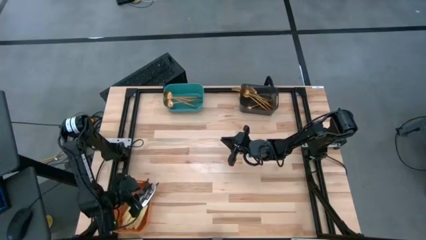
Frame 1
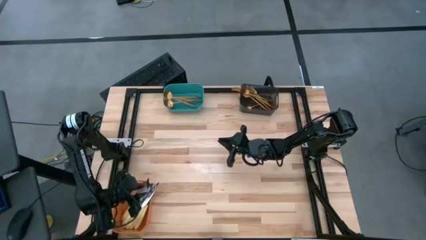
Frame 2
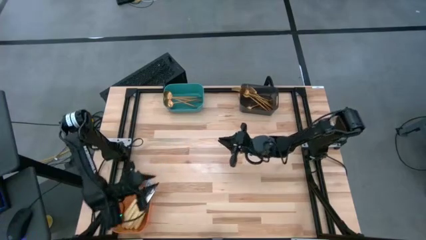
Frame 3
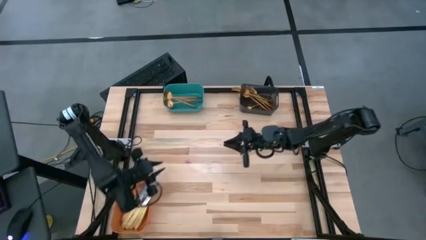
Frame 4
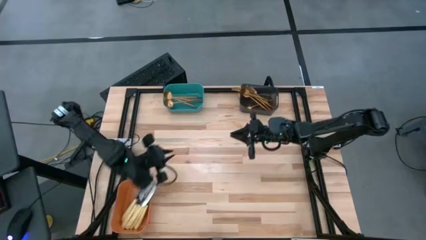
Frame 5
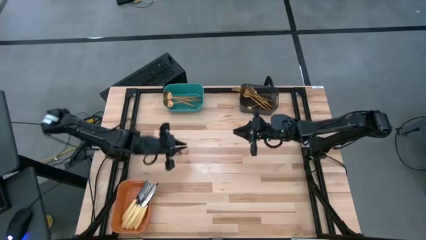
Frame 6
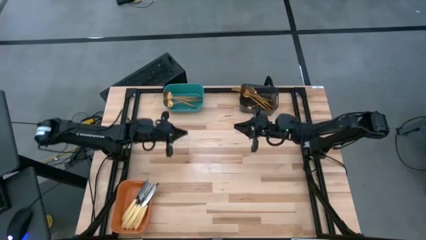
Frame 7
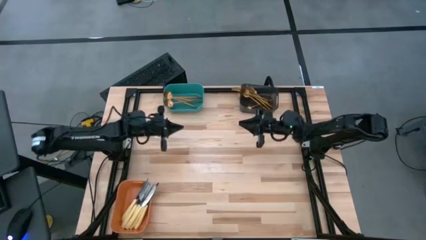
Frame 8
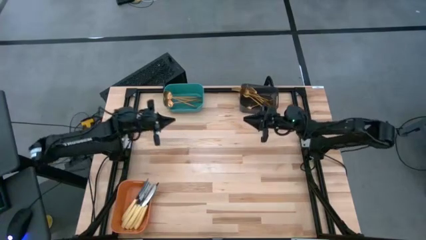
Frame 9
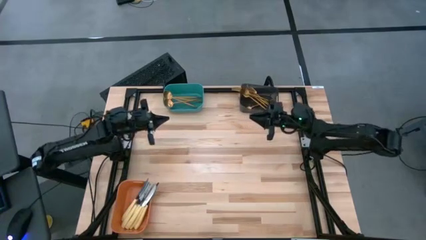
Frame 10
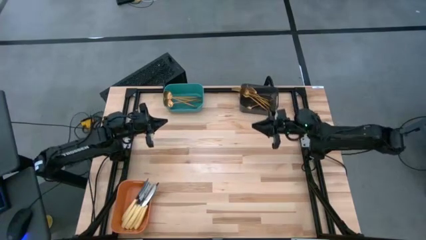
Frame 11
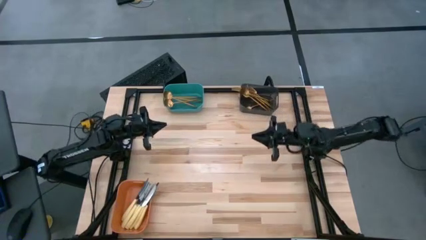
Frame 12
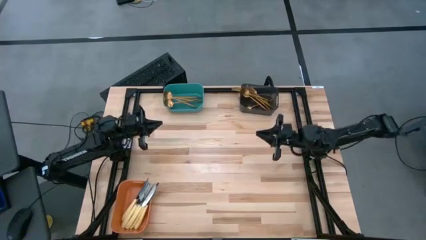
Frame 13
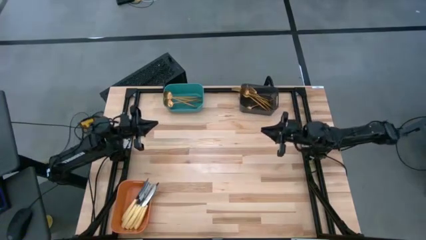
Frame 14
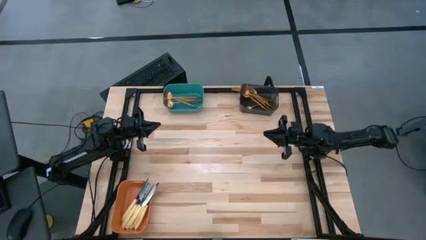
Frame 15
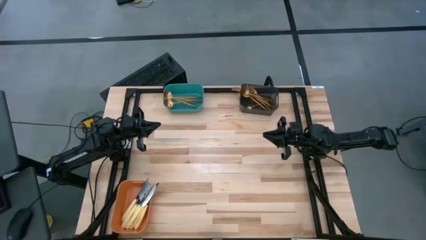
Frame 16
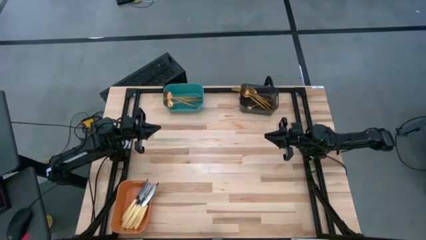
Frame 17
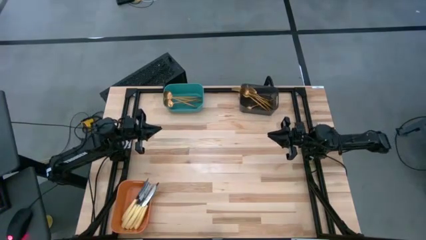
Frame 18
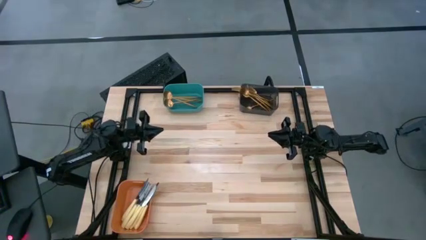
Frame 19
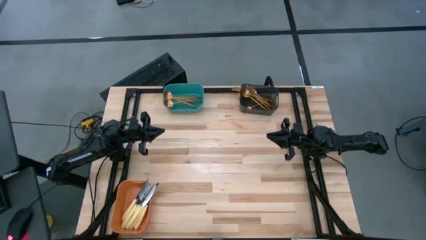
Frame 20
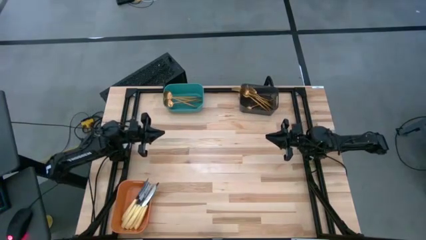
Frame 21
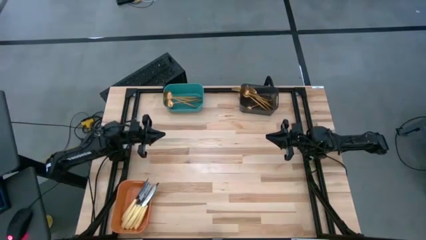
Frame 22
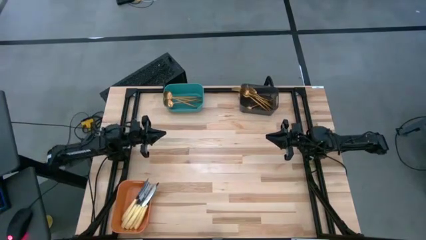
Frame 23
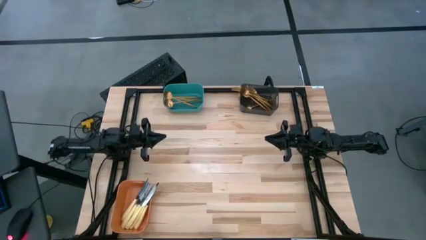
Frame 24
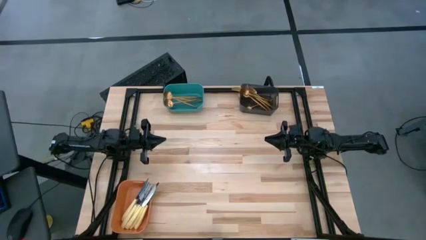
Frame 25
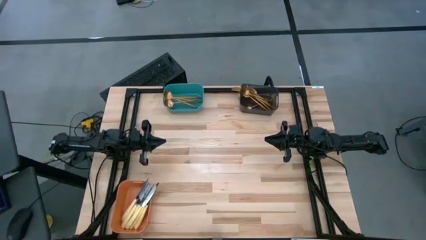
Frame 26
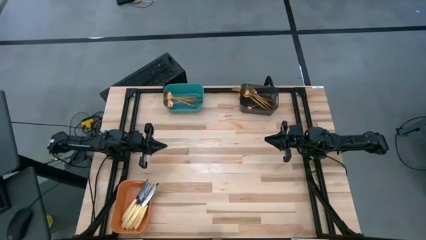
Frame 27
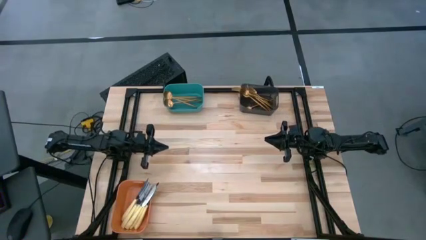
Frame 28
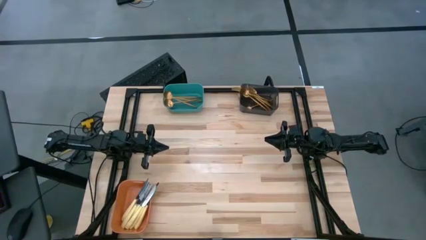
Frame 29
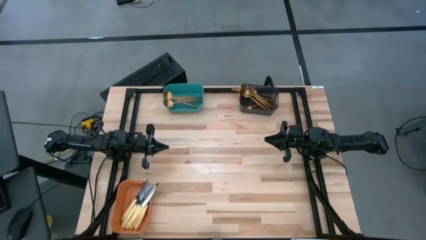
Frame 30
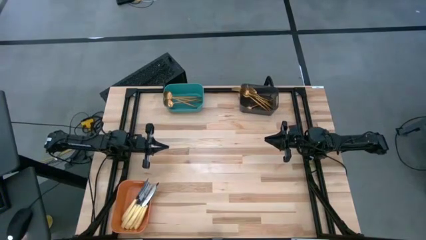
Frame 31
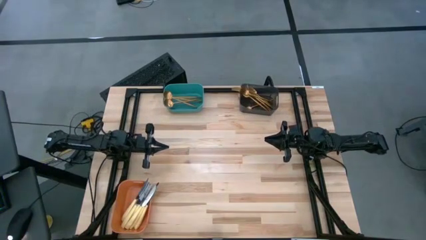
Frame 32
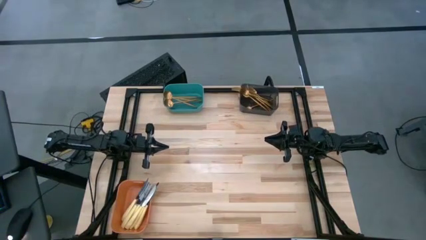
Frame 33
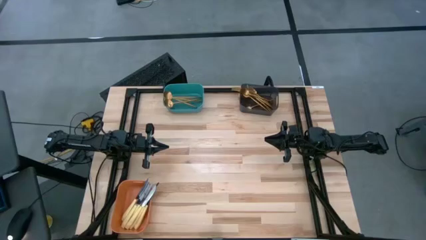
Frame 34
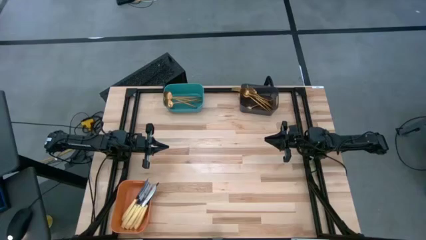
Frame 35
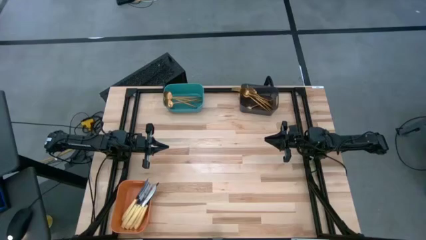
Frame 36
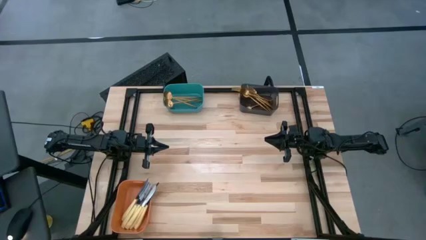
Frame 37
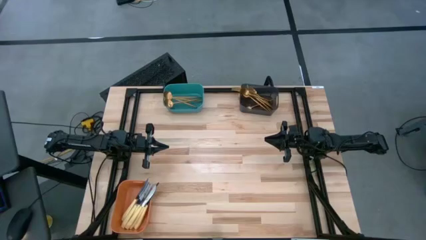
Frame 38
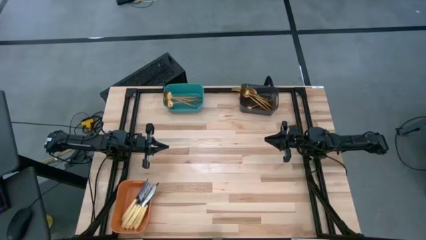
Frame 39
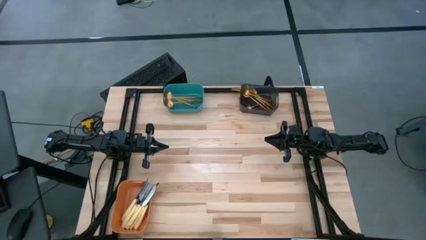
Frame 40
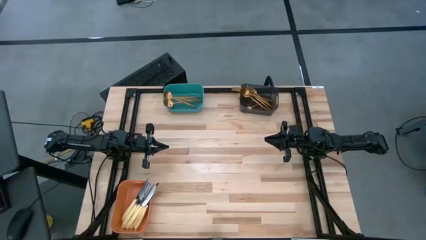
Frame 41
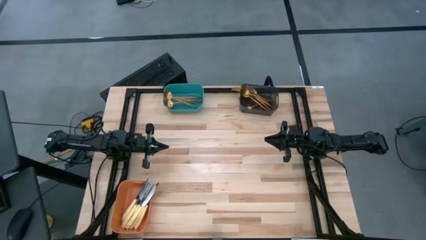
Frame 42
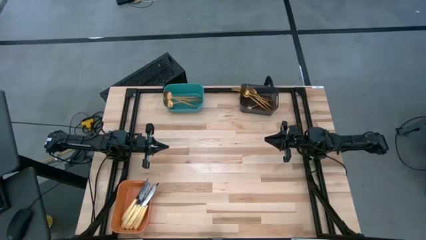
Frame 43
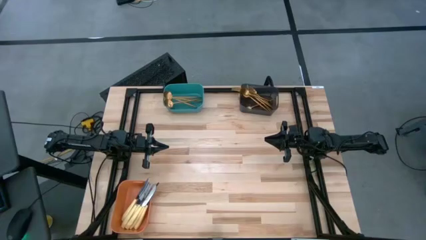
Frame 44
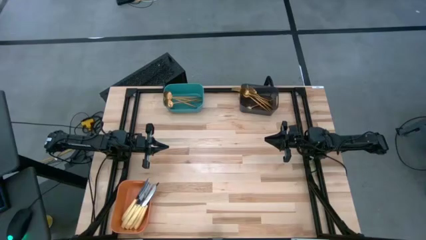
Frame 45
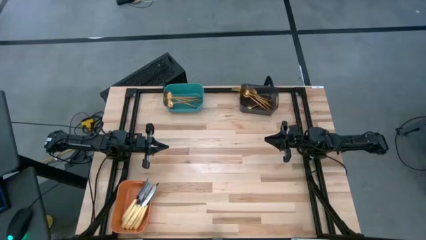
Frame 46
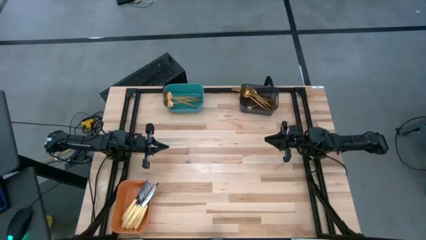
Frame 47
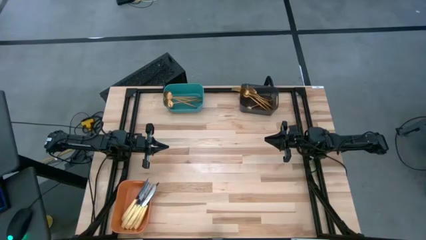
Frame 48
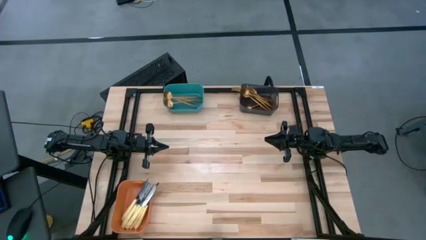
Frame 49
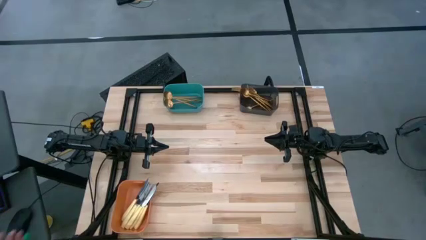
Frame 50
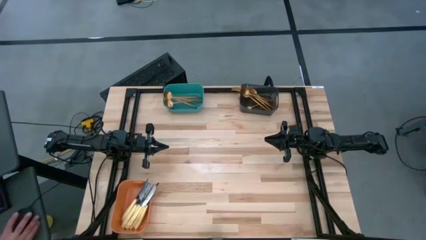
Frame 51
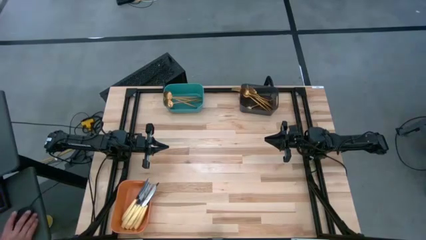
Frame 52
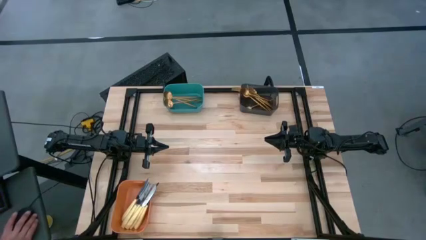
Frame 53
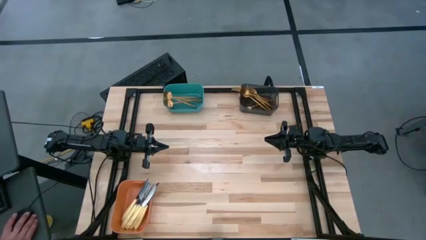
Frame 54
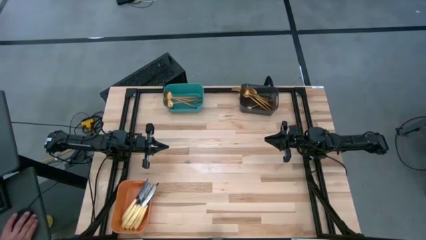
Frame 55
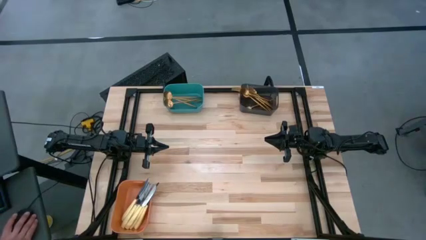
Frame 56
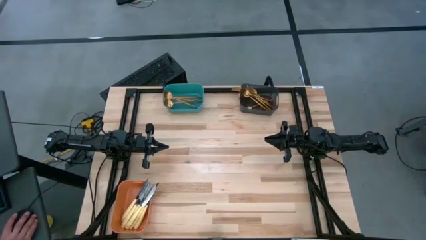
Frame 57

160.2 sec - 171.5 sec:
Task: Sort silverware by color (type)
Return to Home Position
